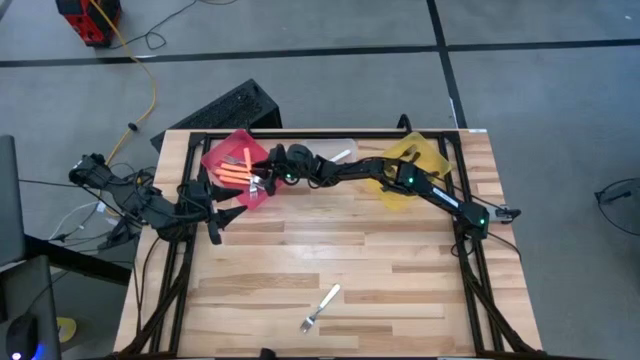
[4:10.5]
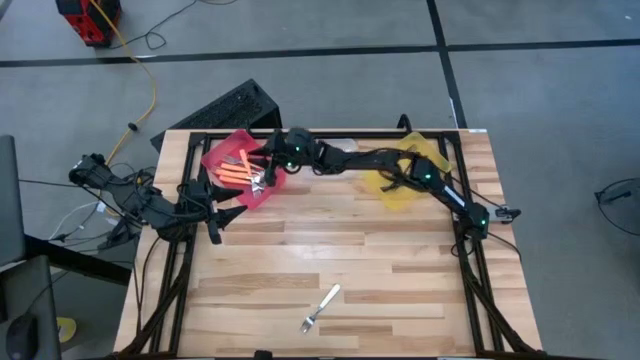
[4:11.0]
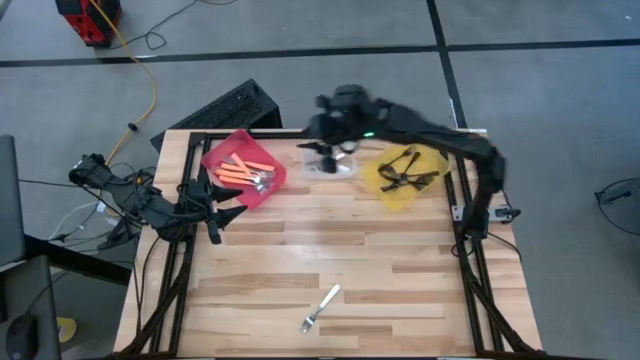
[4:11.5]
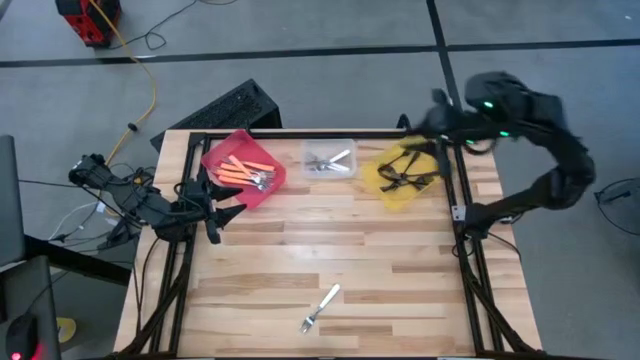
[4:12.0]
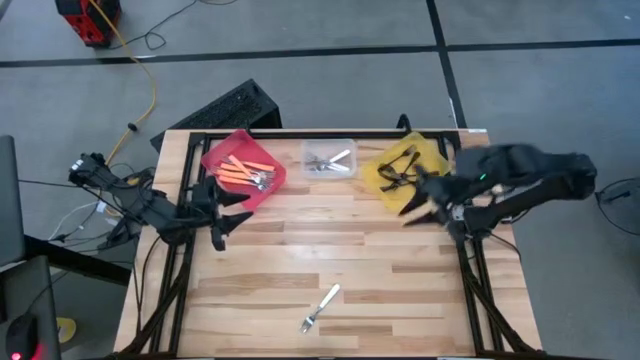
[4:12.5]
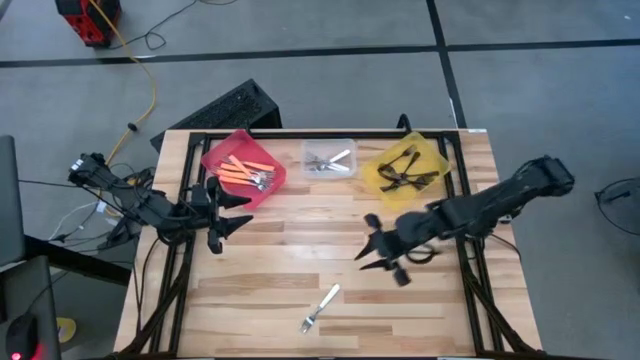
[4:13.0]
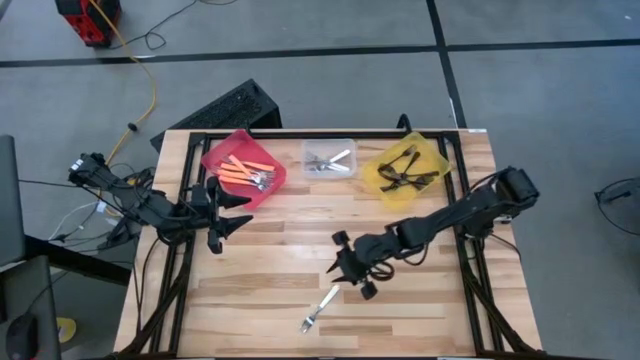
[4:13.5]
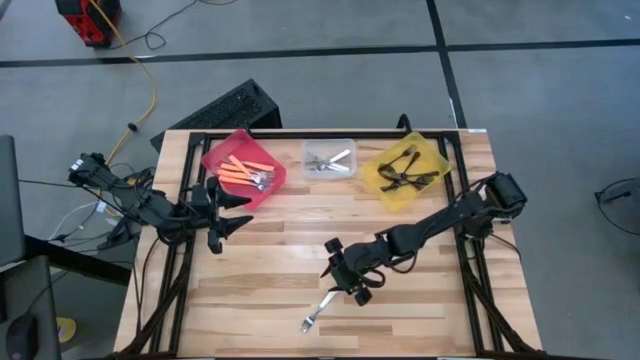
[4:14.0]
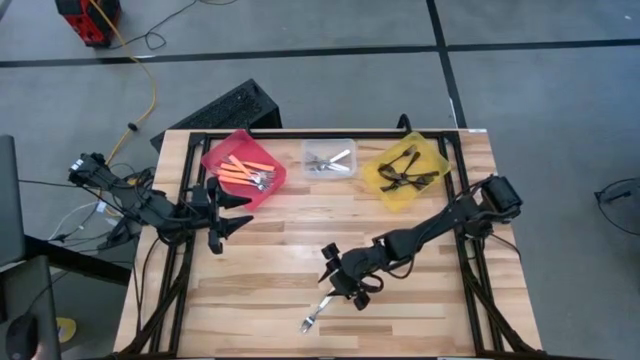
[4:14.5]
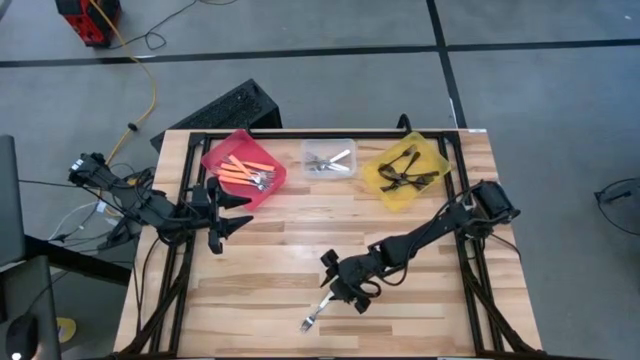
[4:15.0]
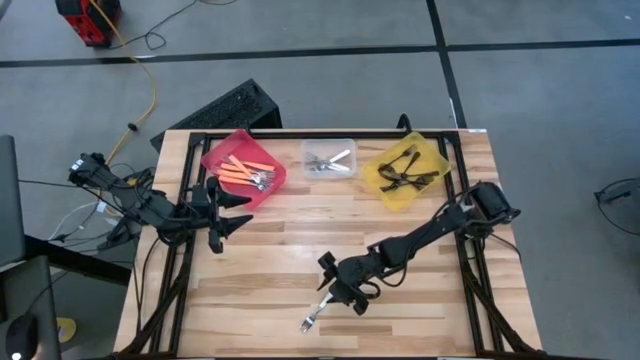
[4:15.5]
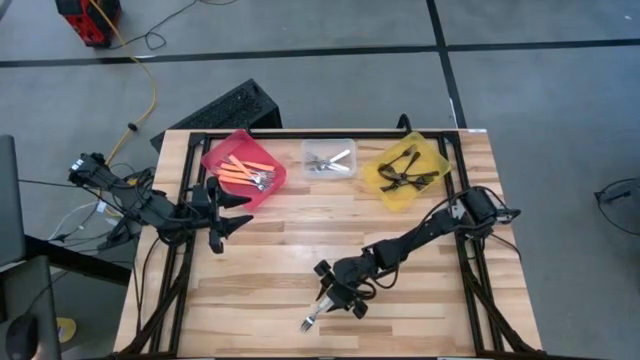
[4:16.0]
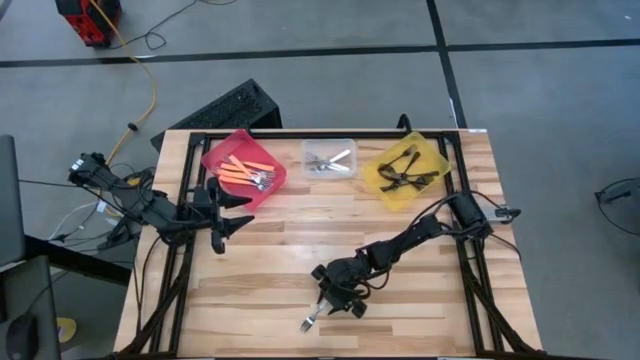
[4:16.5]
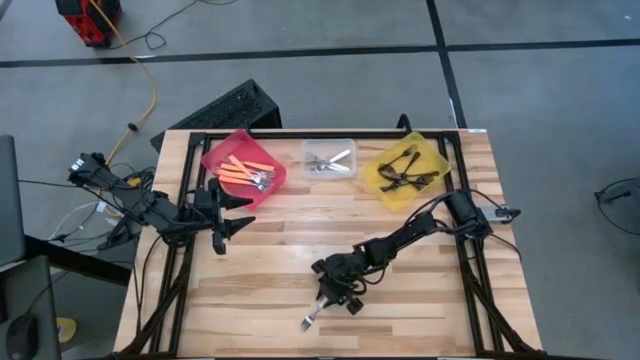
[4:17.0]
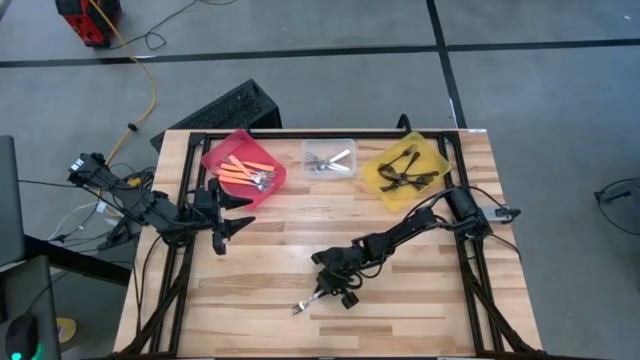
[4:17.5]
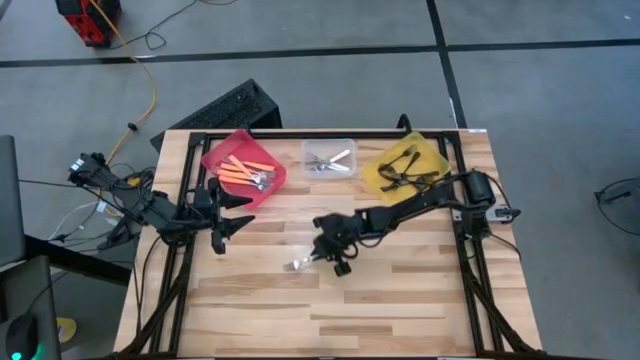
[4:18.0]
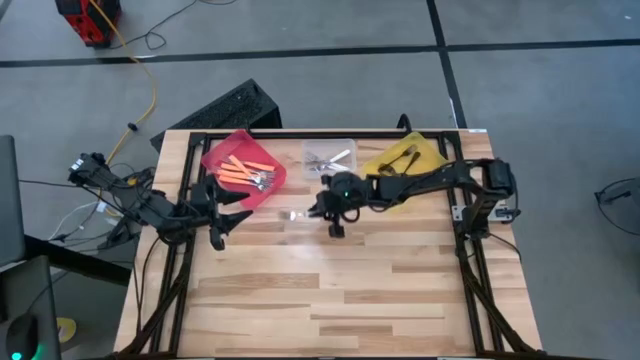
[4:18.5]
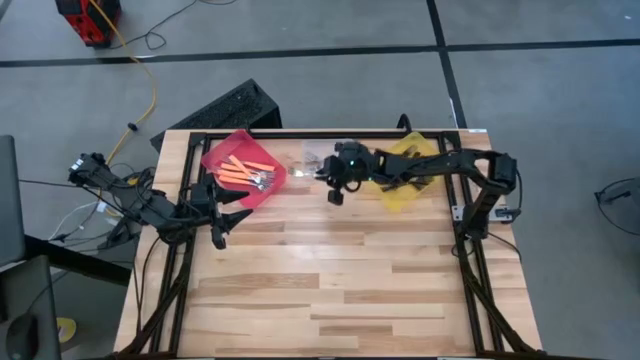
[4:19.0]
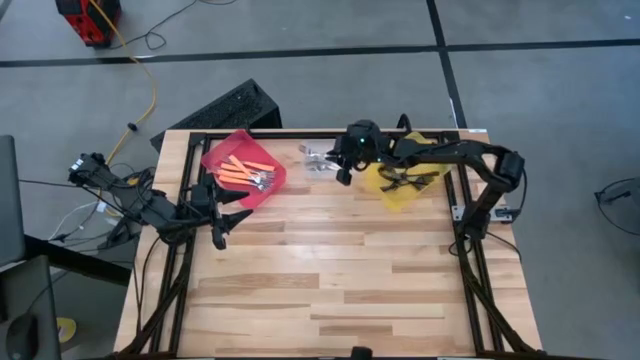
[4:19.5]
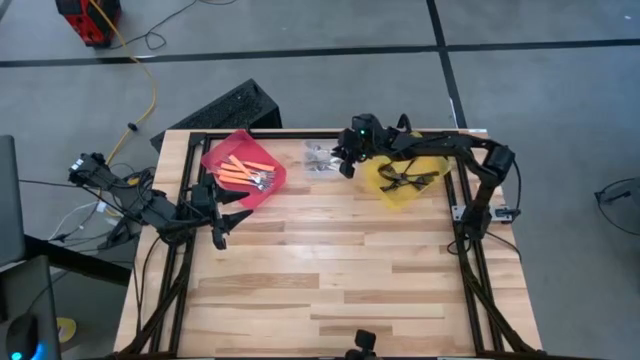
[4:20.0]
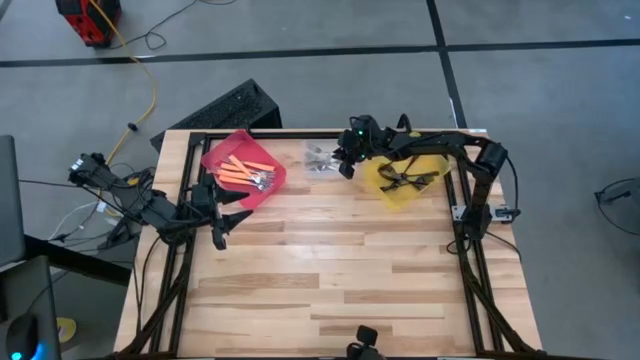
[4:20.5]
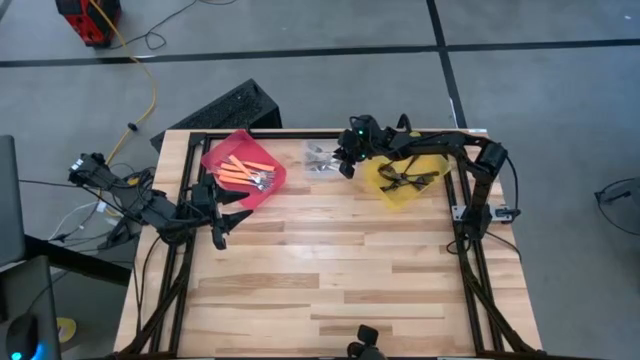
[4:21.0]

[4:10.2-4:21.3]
Task: Sort silverware by color (type)
Put the white fork into the transparent bin

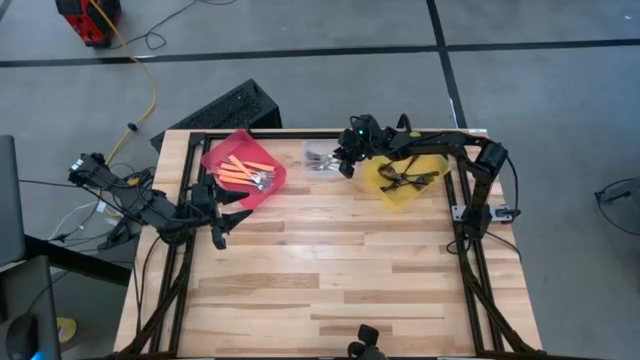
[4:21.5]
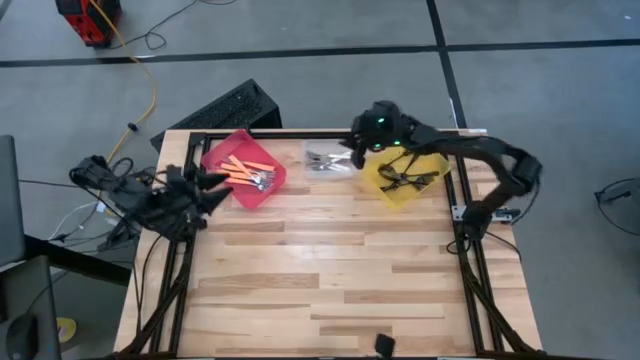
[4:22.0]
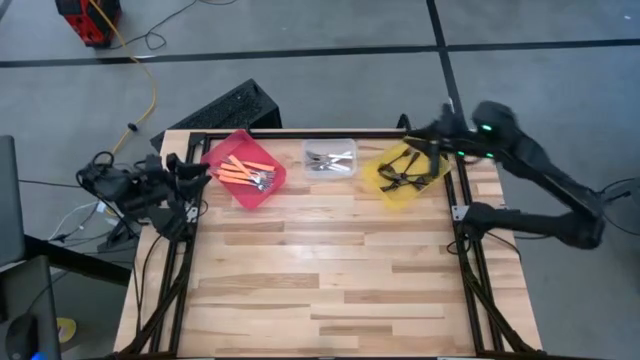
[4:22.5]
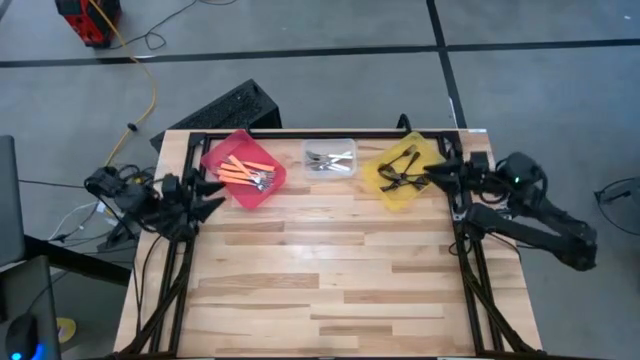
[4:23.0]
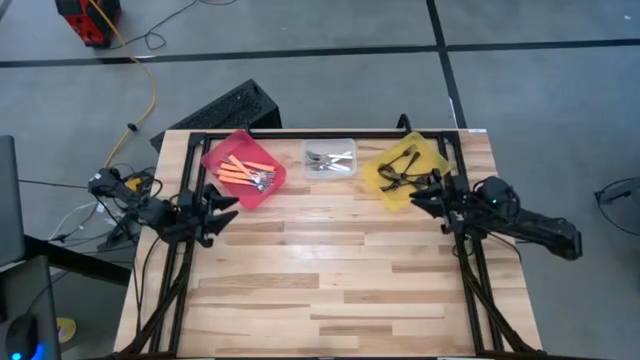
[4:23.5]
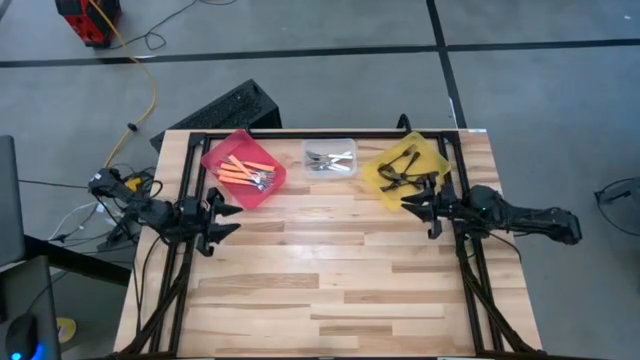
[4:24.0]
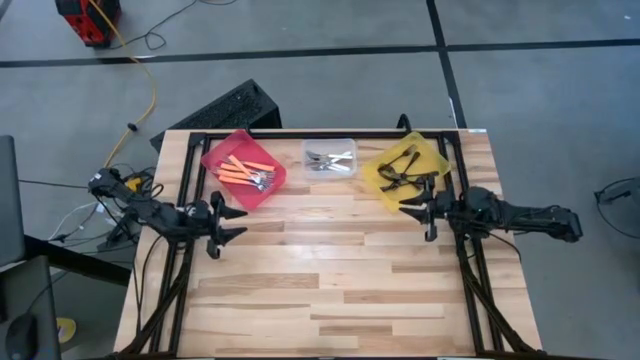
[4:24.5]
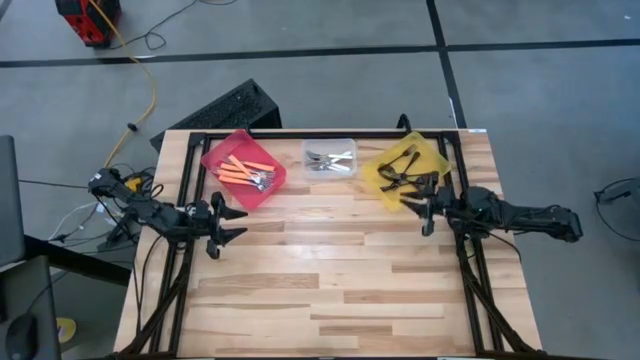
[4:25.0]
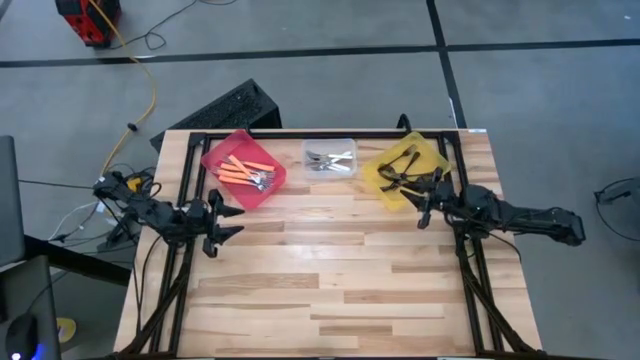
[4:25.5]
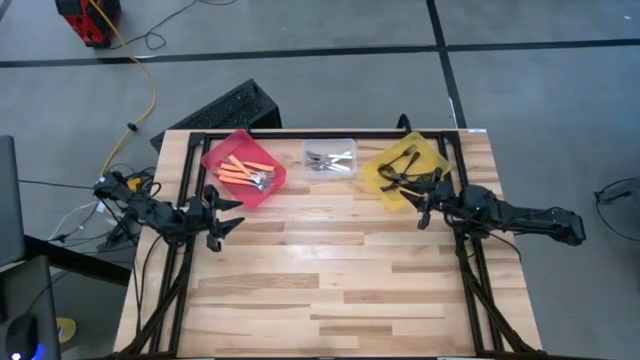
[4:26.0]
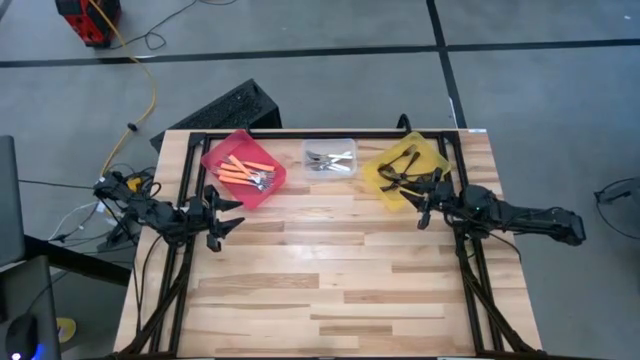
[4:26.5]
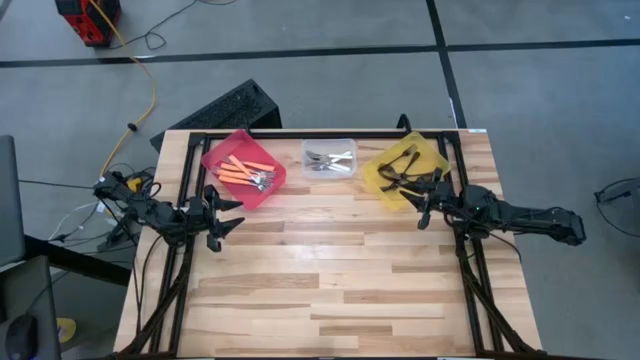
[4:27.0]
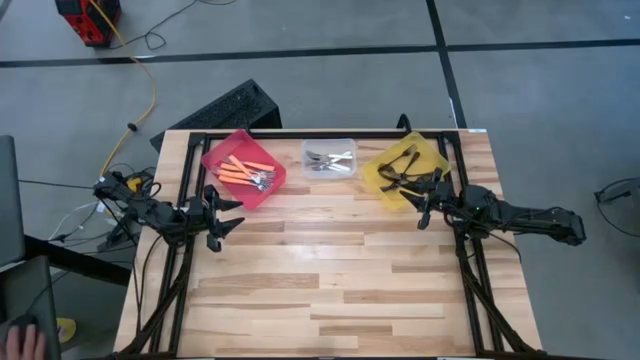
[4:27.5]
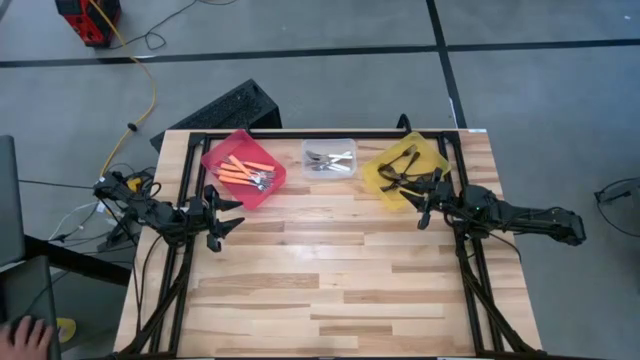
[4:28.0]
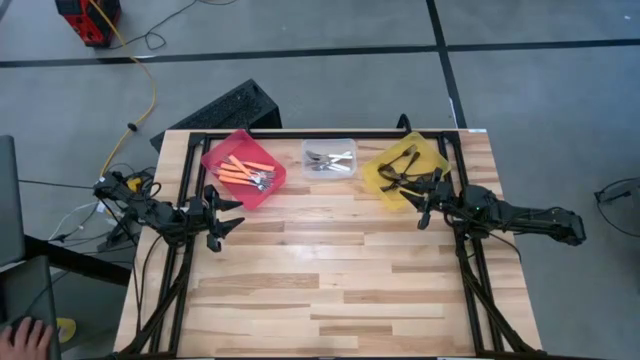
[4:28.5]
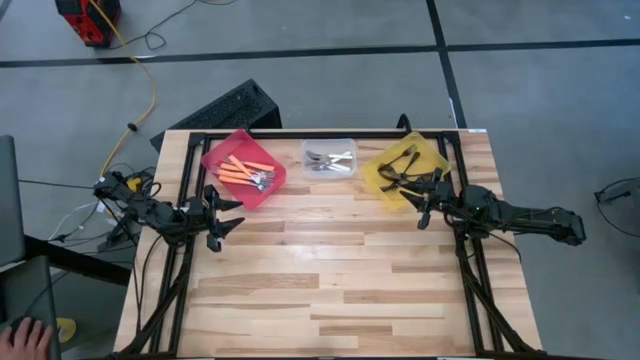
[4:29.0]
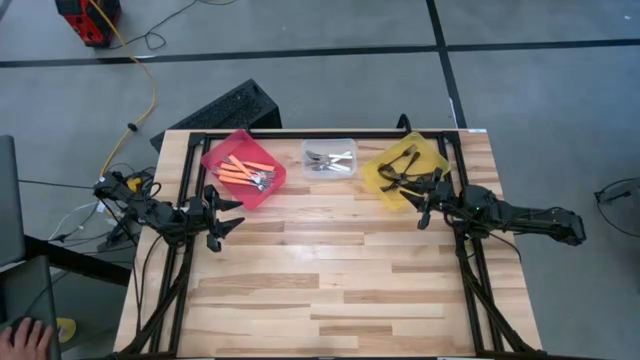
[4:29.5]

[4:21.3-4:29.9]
Return to Home Position

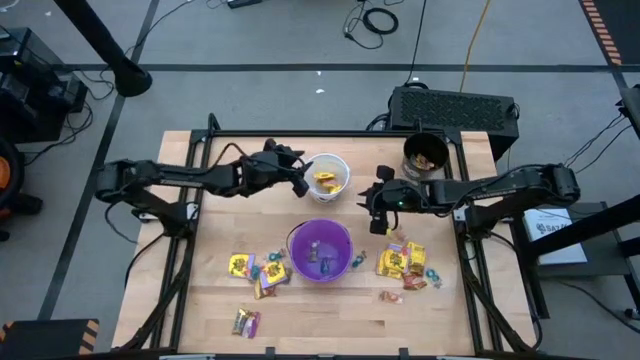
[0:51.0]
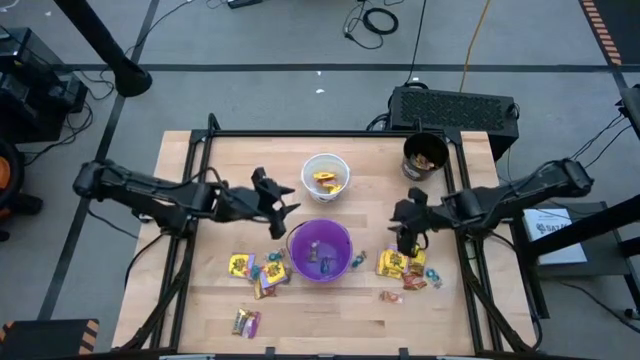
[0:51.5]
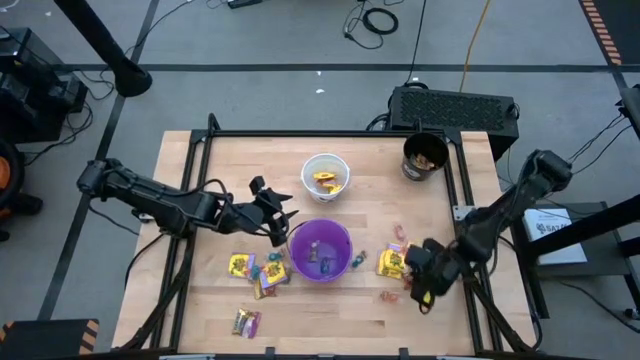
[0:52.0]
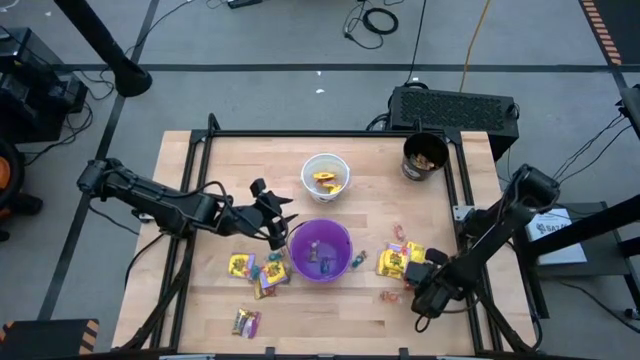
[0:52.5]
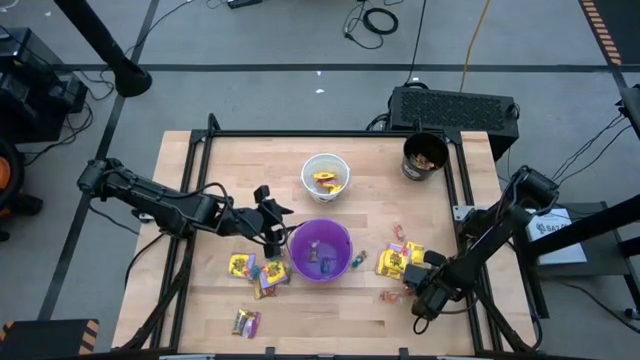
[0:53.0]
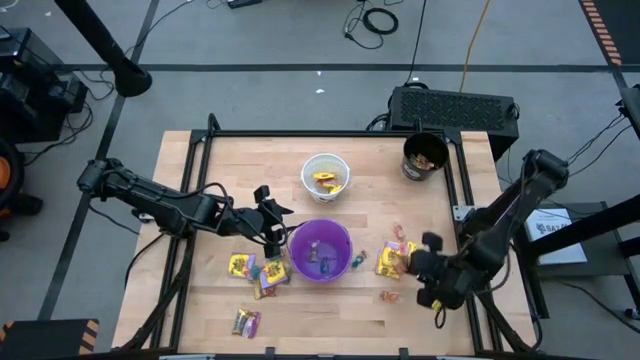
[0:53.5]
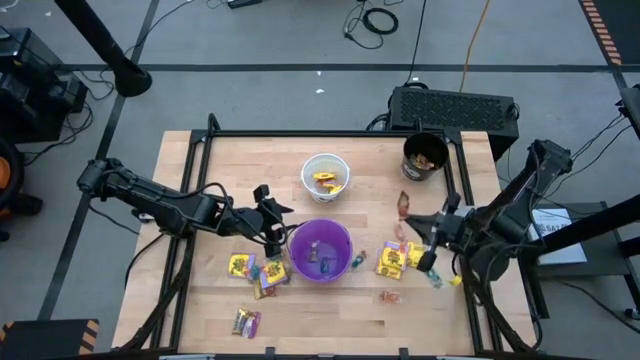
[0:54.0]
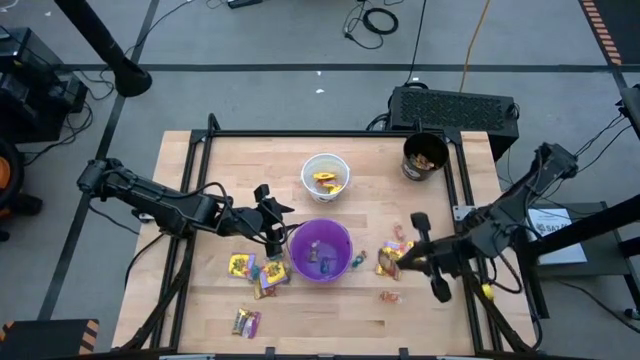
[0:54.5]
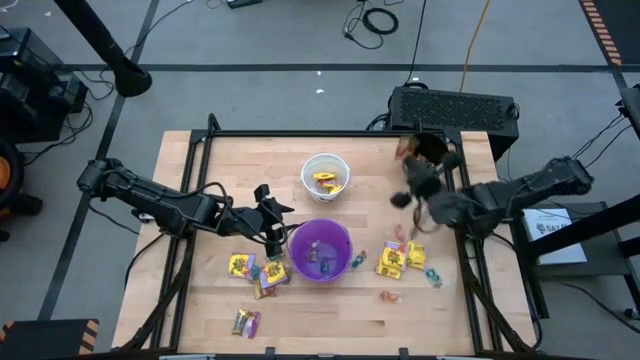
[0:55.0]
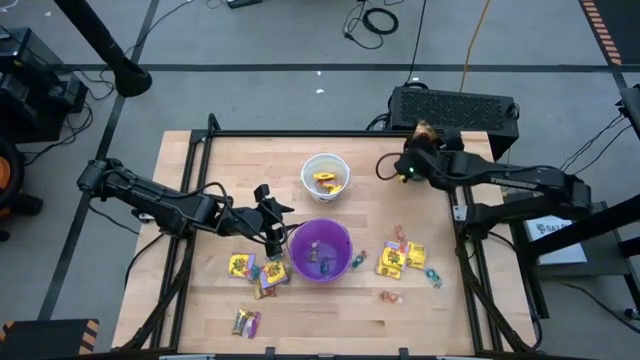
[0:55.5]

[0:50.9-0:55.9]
Task: Sort candy by brand, put in halloween buckets
Put the gold candy into the black bucket
